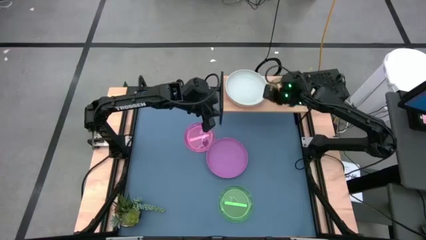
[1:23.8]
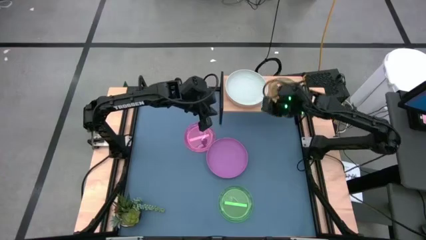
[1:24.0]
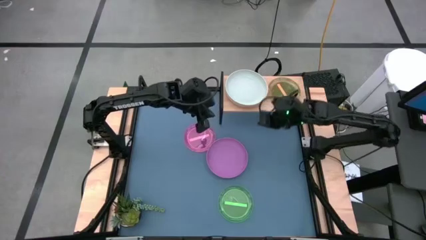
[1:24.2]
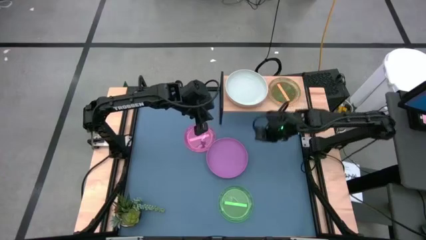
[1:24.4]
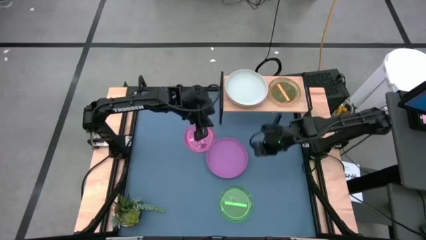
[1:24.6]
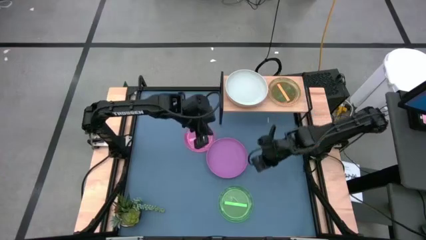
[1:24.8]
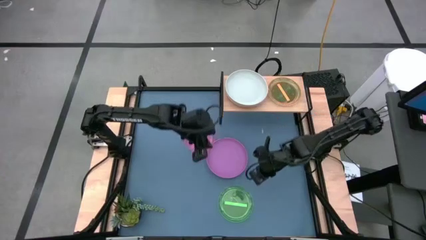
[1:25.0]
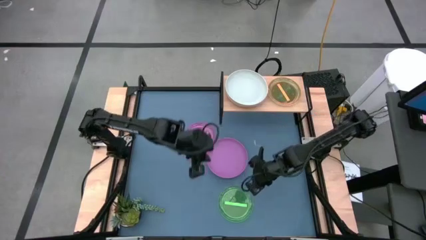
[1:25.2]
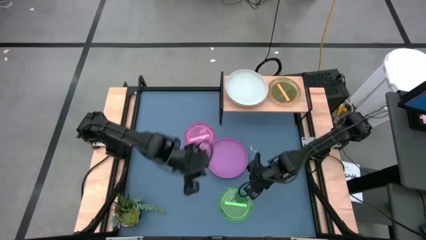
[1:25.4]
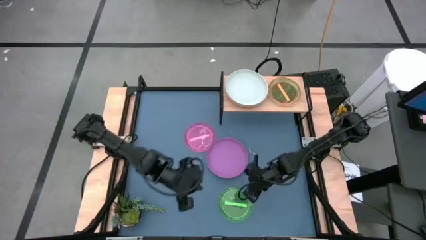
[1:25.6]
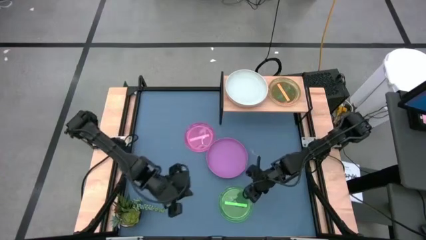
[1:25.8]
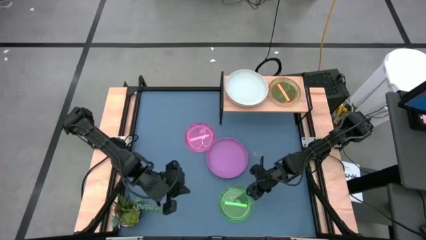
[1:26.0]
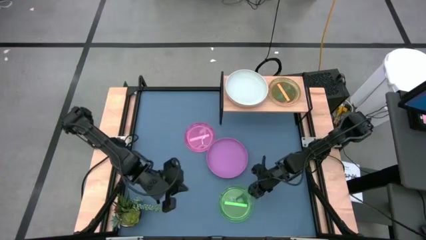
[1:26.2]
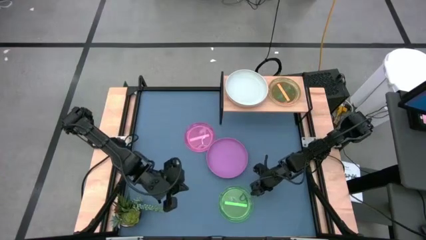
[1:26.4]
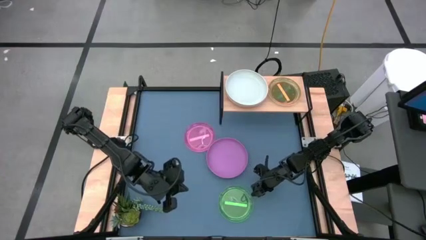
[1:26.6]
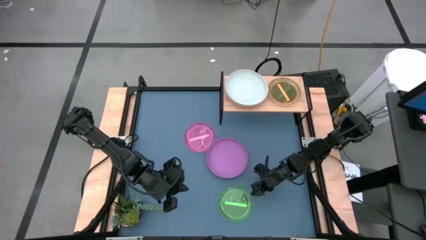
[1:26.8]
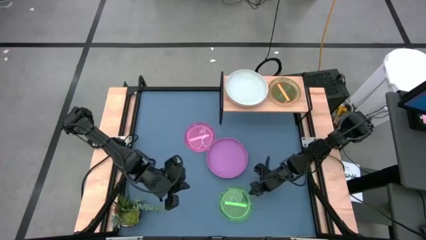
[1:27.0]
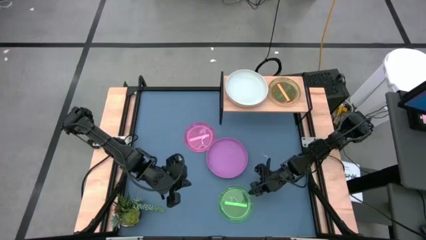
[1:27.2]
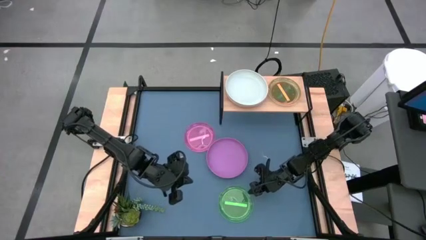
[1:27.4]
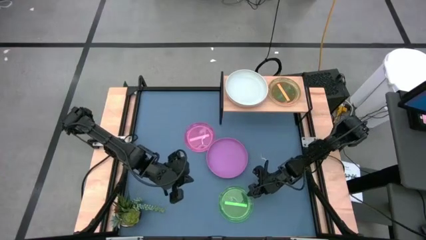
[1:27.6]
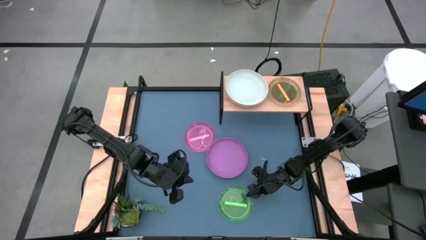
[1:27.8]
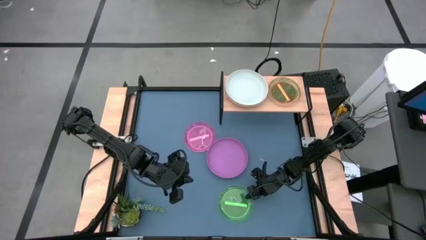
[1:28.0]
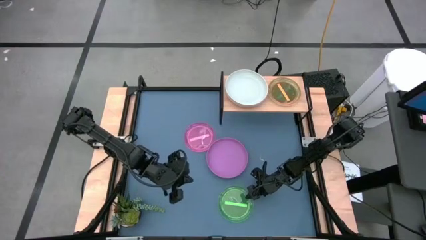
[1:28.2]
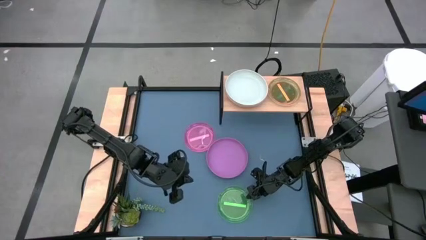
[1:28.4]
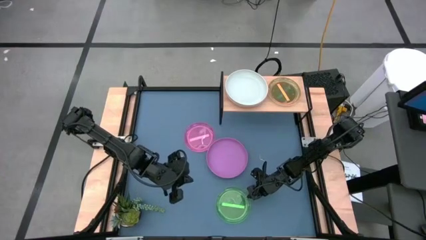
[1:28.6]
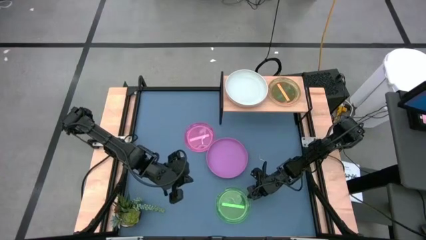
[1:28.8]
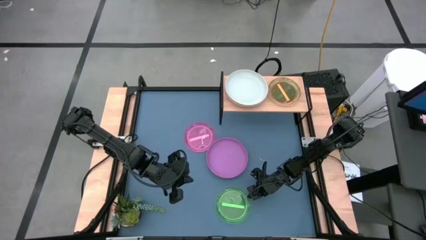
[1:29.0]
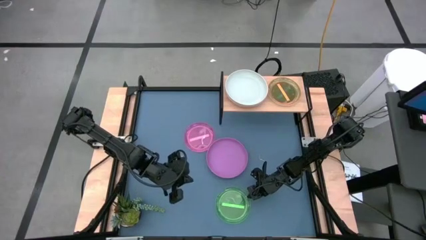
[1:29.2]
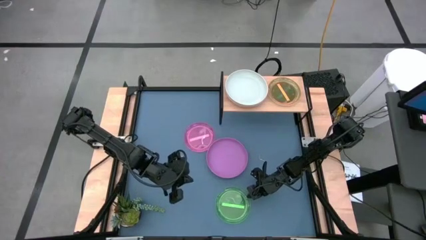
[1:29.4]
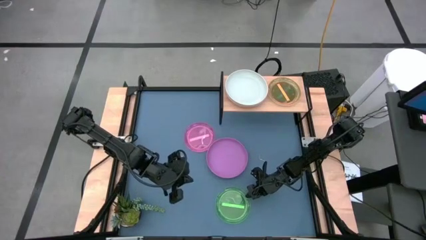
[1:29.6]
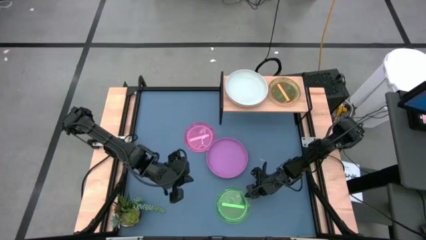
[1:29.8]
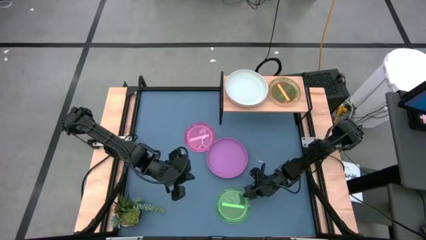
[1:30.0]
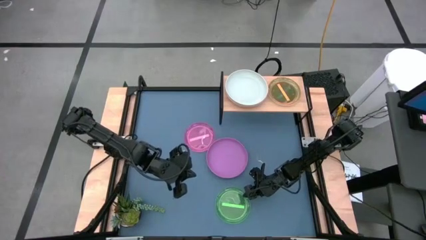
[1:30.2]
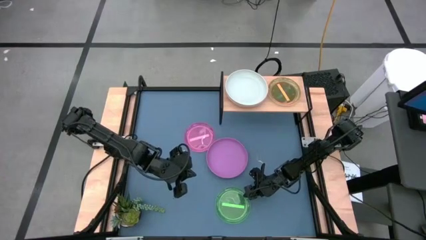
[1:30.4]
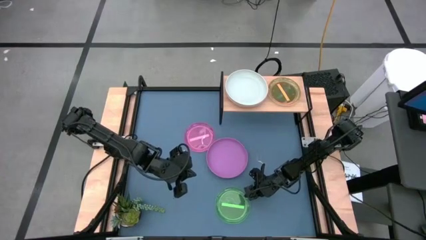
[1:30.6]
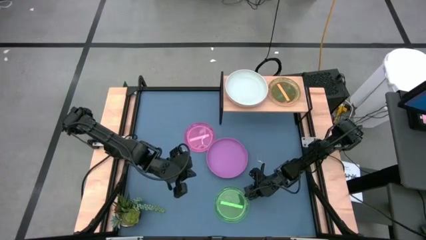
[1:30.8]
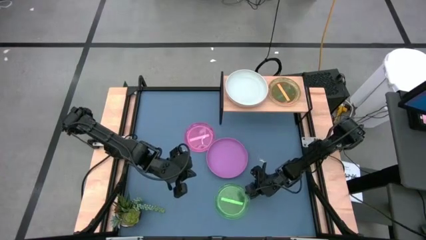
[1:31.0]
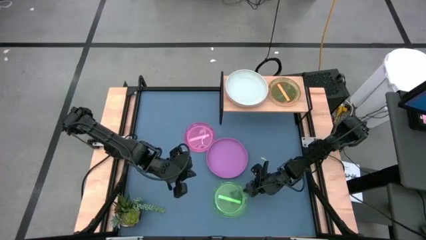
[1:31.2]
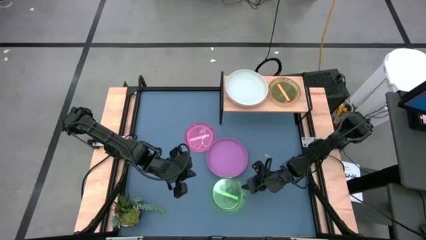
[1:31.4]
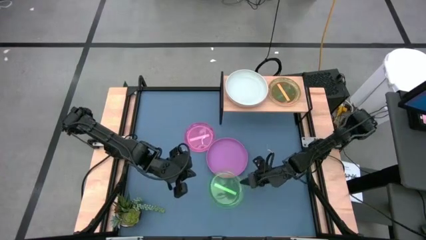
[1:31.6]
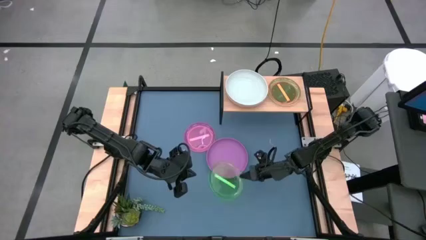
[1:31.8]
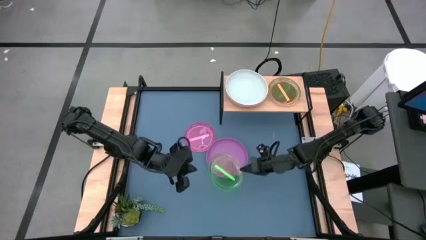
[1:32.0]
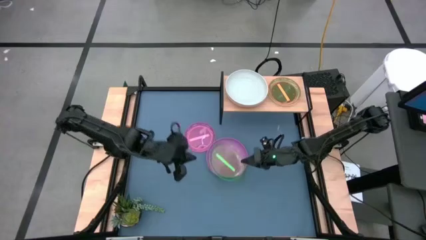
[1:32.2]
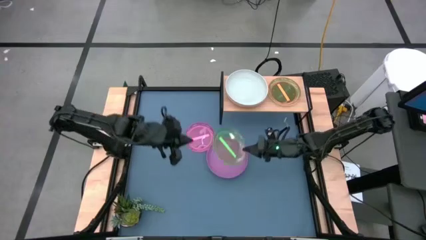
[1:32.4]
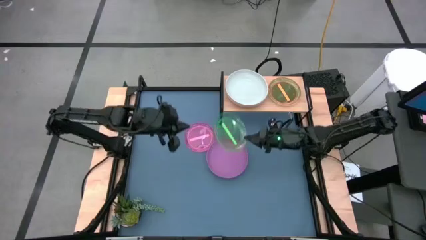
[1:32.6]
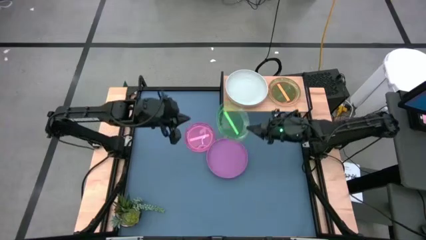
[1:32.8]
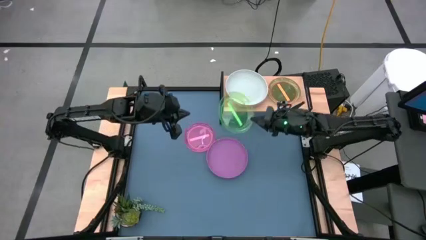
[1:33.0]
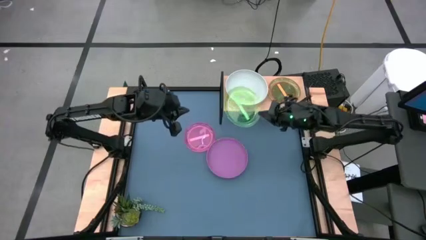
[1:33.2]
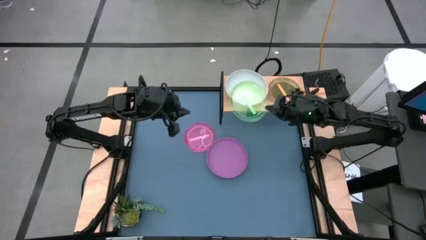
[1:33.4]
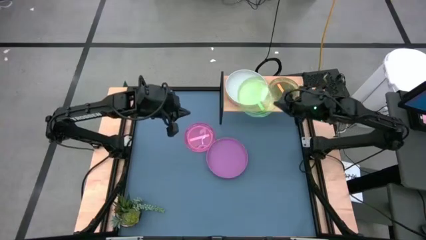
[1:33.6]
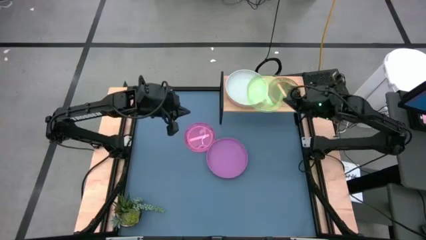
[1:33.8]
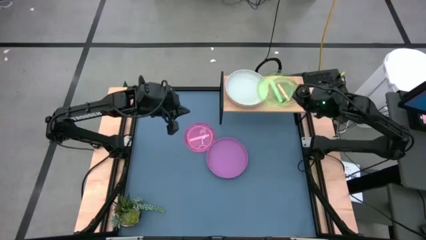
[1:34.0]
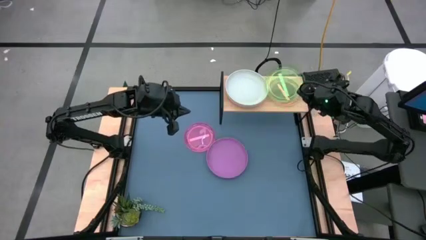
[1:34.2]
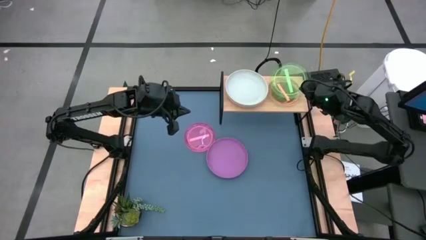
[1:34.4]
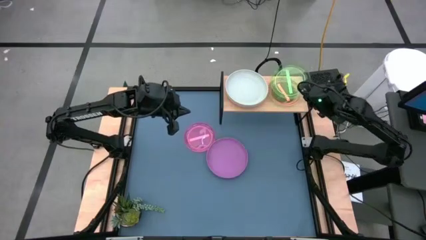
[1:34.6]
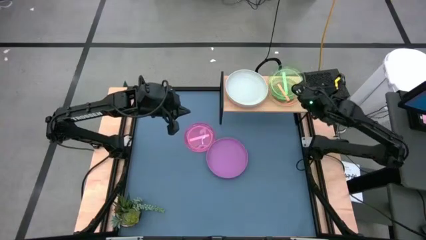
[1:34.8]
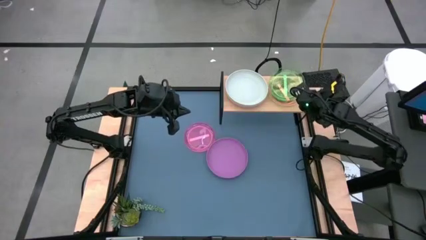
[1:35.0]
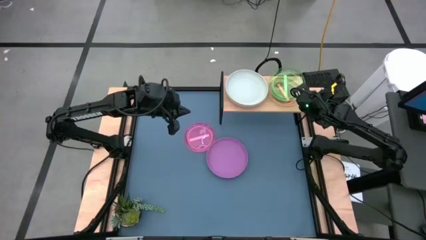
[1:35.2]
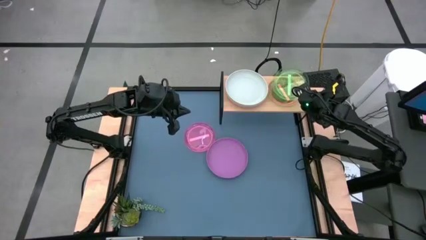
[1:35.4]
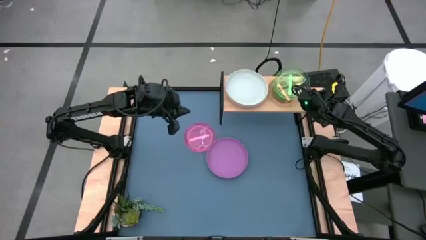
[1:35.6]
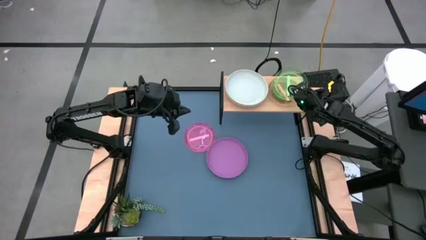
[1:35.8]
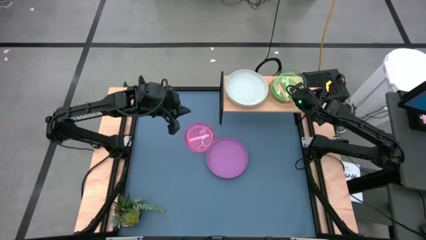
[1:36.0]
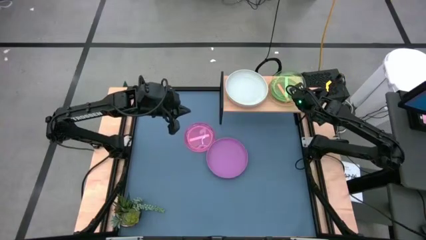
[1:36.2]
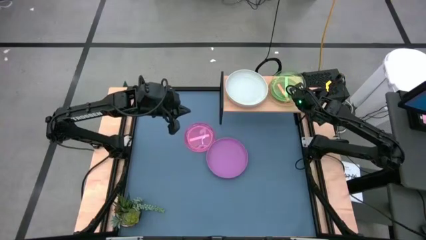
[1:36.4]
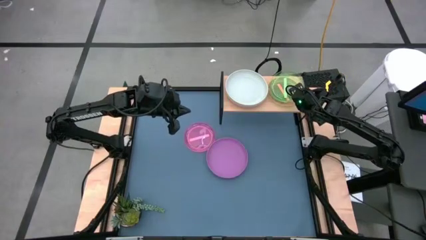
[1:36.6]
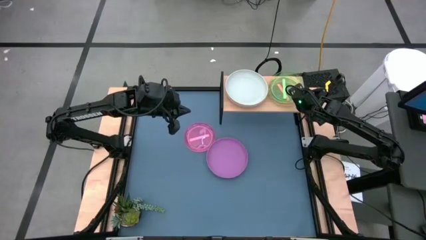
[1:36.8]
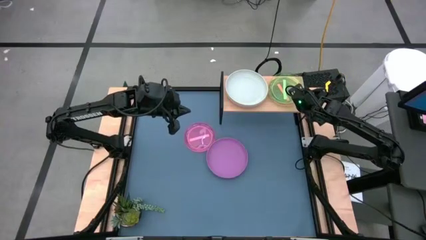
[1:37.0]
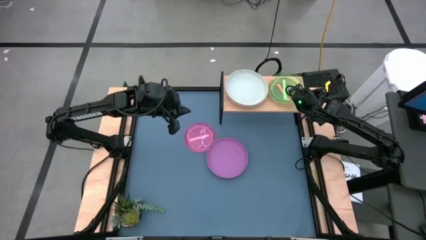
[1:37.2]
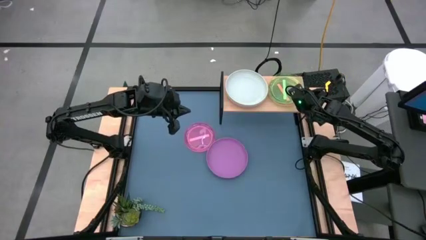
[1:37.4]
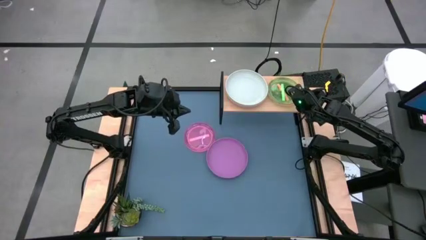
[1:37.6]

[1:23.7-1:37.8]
Task: Place and stack plates onto a shelf
Stack the small green plate on top of the small orange plate on the shelf
